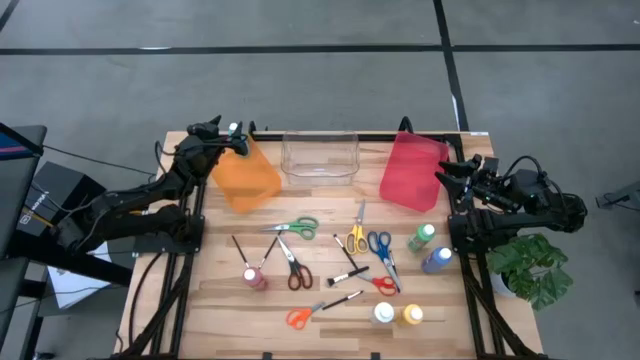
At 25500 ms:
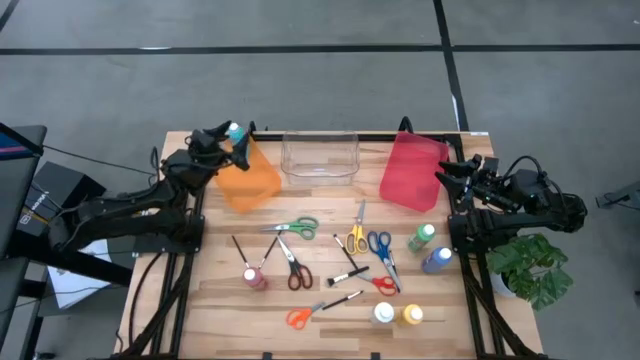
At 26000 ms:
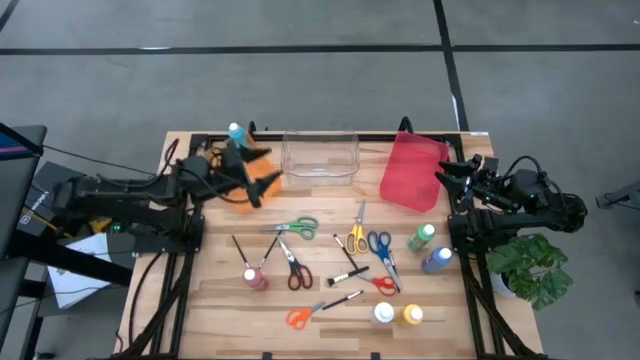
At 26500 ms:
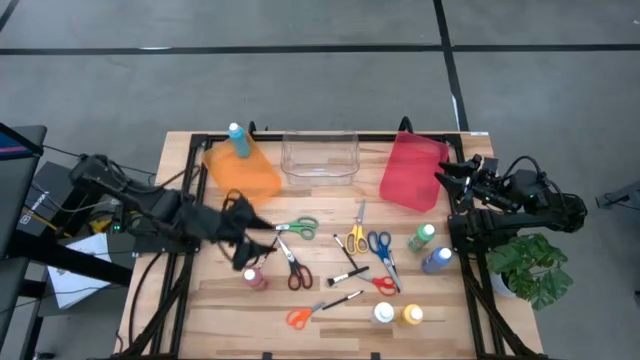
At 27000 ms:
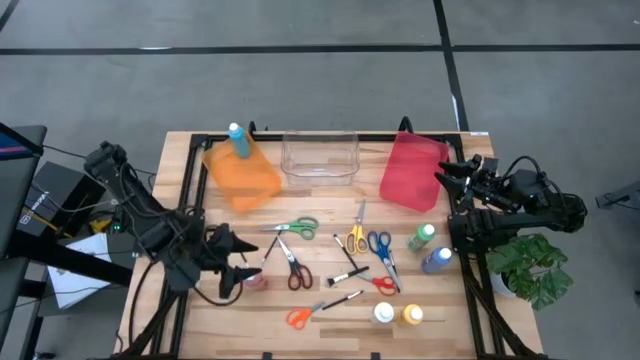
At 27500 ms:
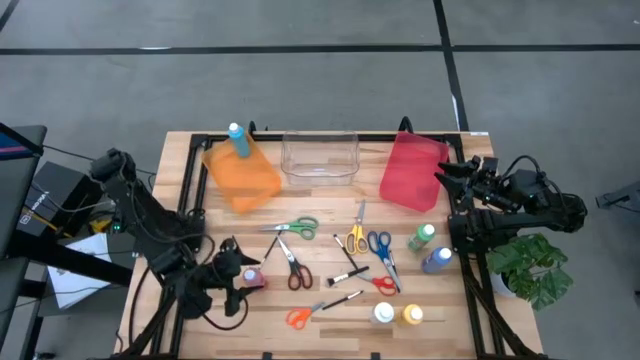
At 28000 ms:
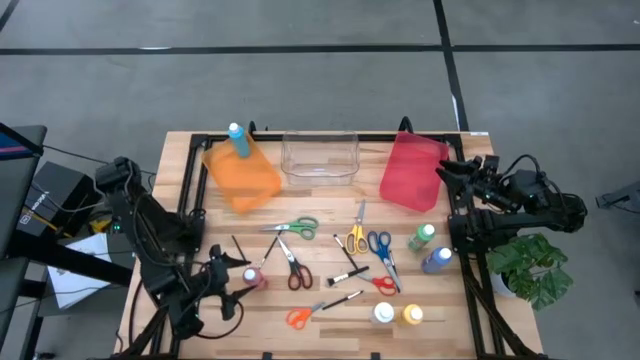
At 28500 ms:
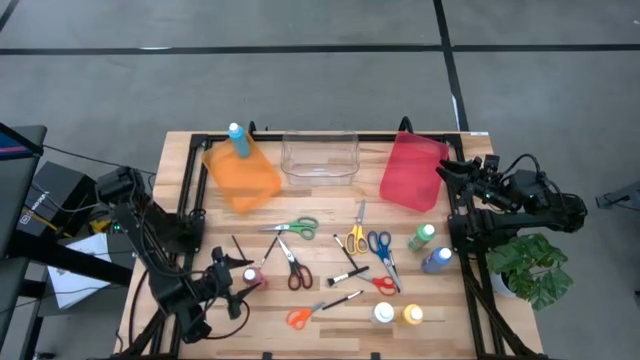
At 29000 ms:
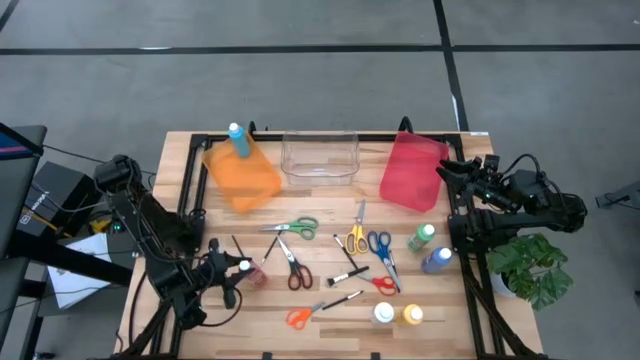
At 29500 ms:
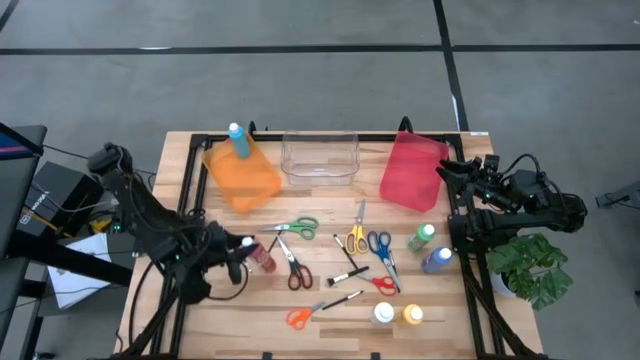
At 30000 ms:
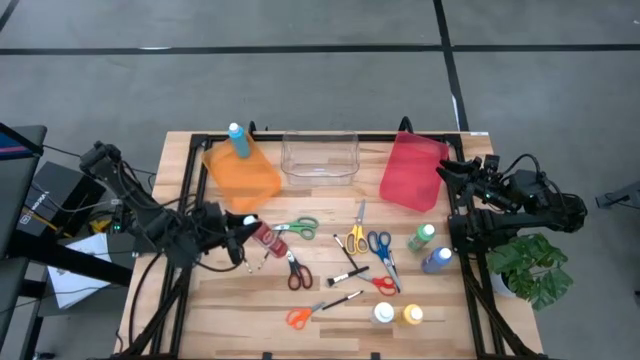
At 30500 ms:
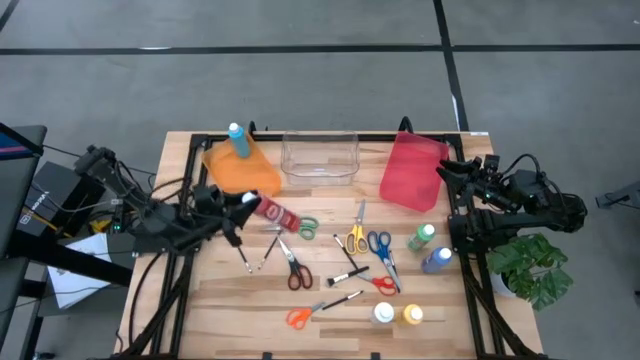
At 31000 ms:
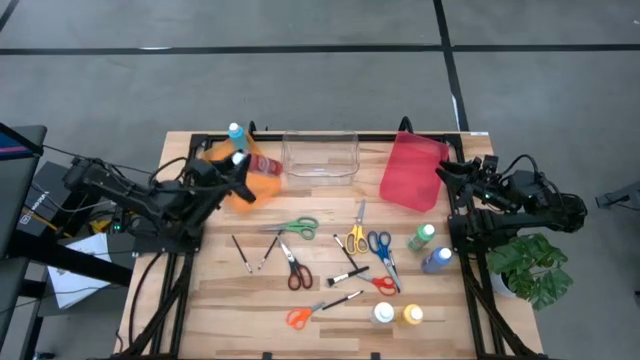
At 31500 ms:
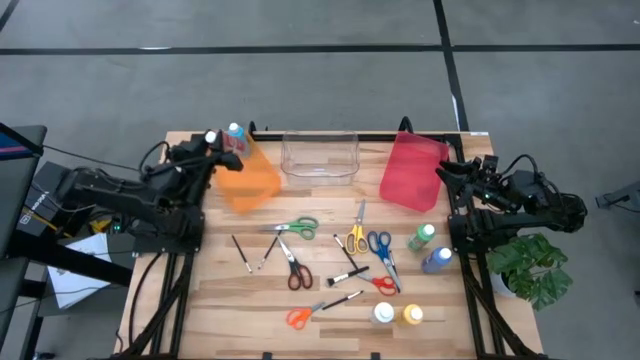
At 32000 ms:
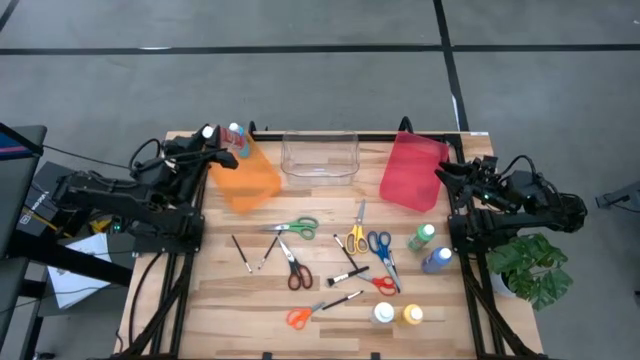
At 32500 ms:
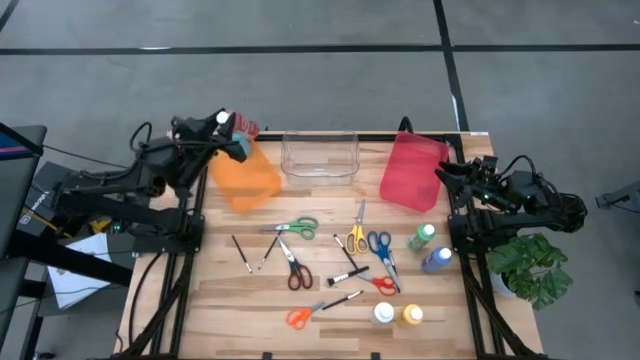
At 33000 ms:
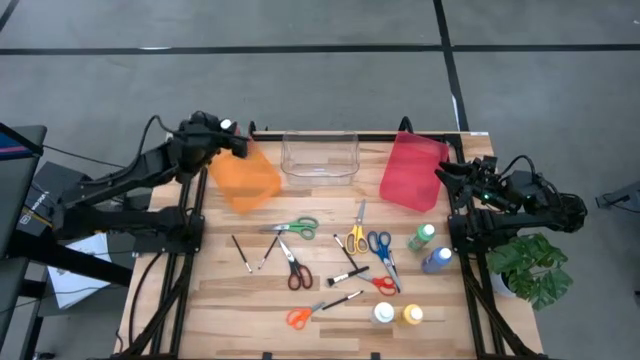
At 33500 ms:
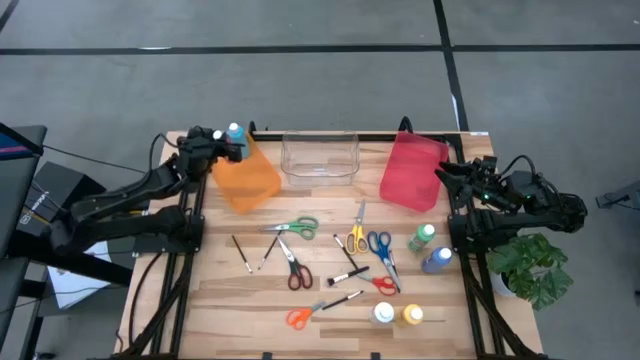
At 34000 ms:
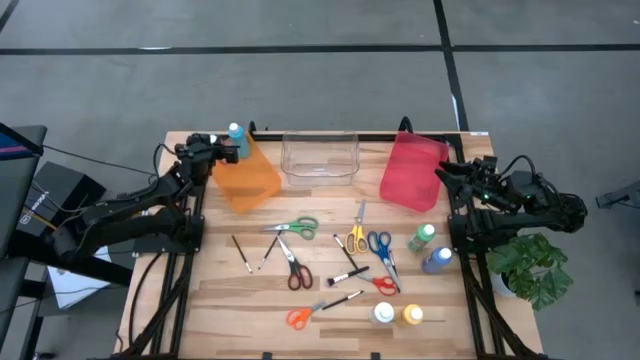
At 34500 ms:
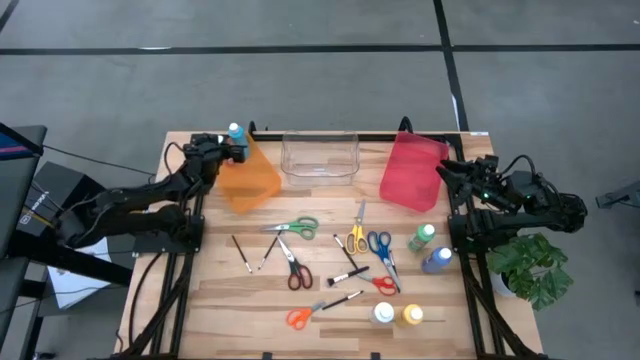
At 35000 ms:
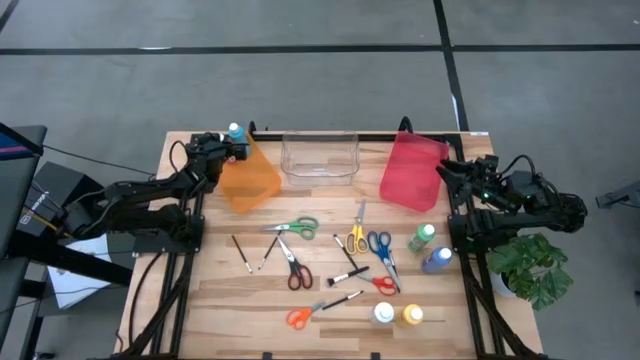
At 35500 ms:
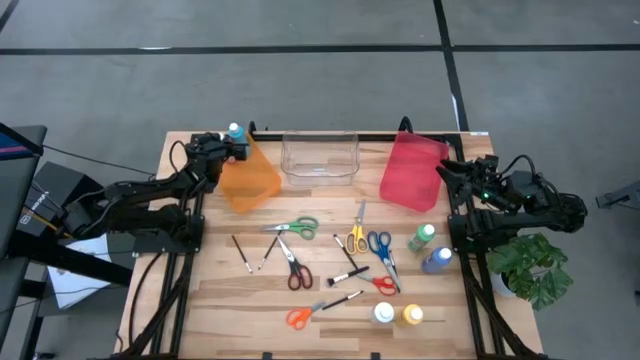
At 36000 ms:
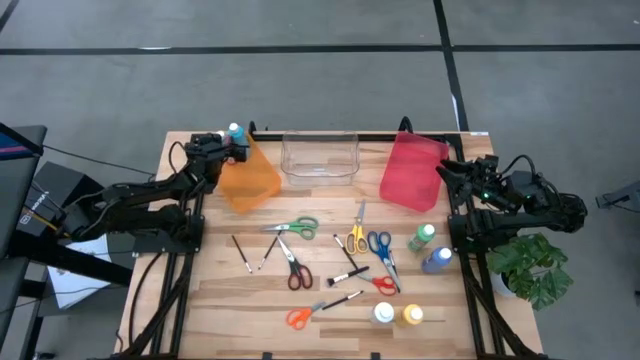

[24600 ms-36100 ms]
Task: Pick & Place Paint Supplies
Put the red paint bottle into the orange bin

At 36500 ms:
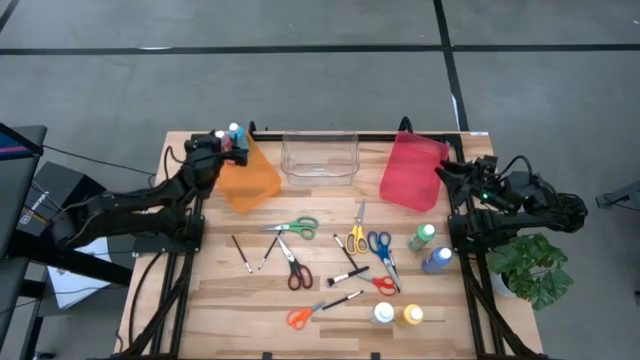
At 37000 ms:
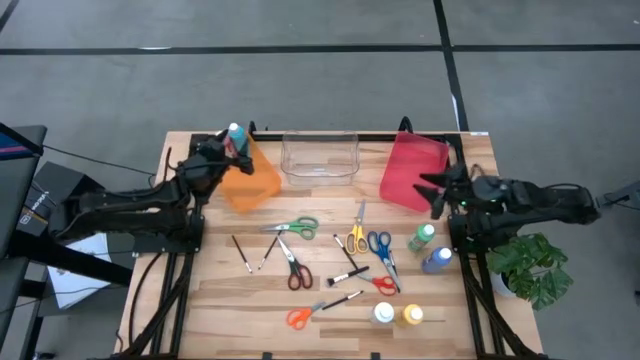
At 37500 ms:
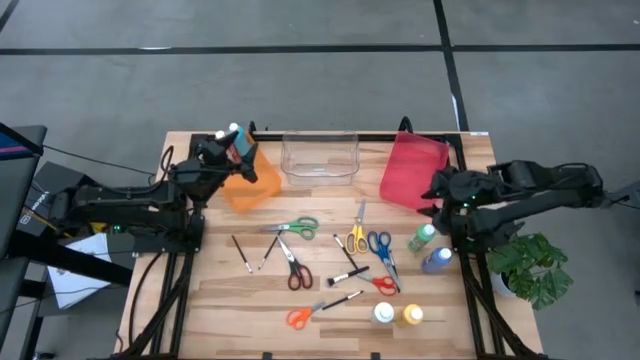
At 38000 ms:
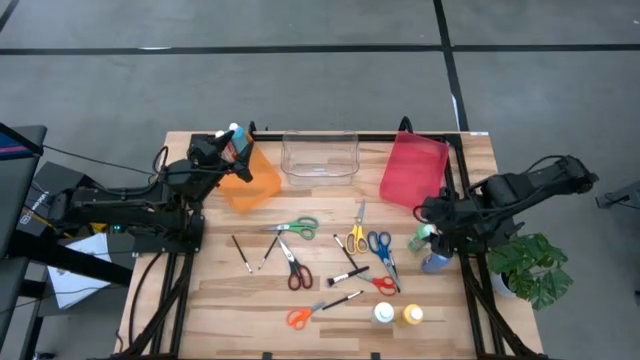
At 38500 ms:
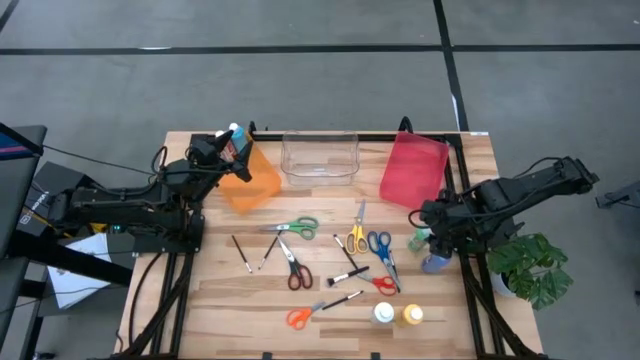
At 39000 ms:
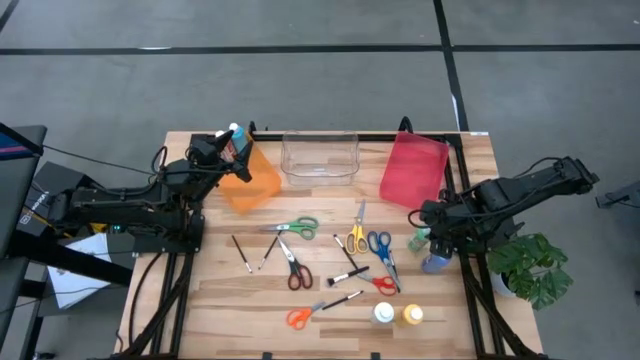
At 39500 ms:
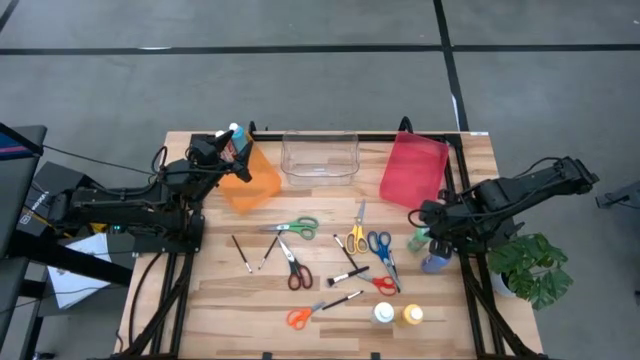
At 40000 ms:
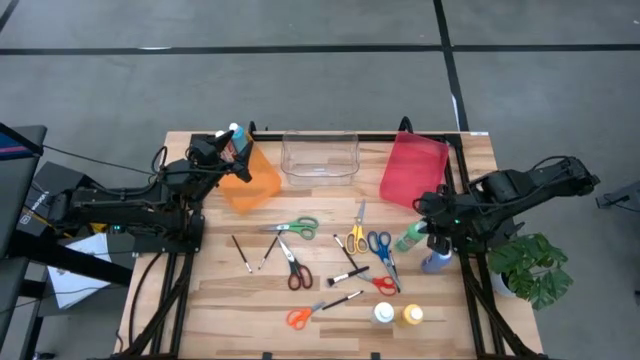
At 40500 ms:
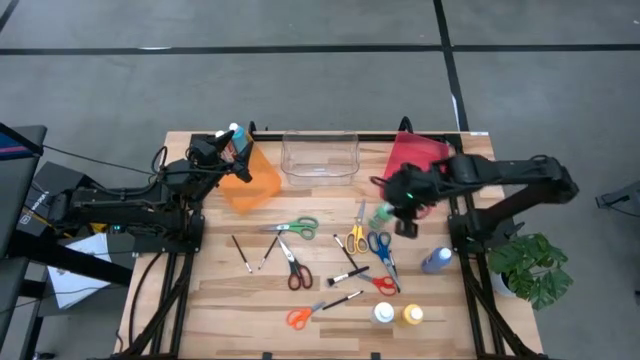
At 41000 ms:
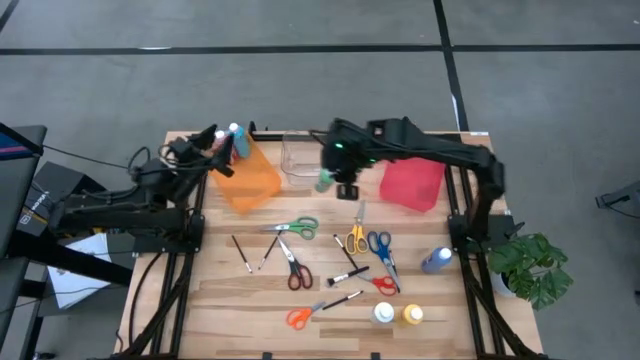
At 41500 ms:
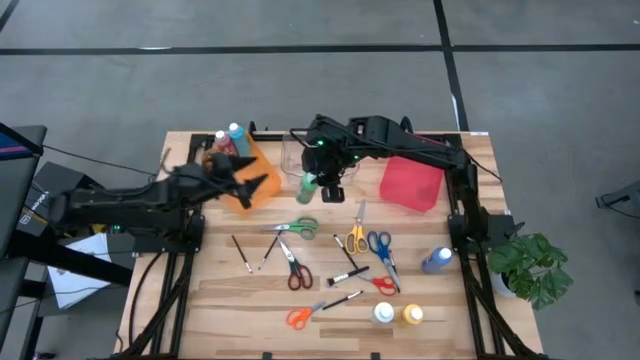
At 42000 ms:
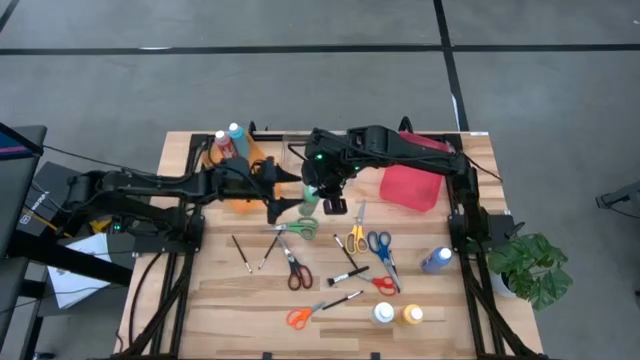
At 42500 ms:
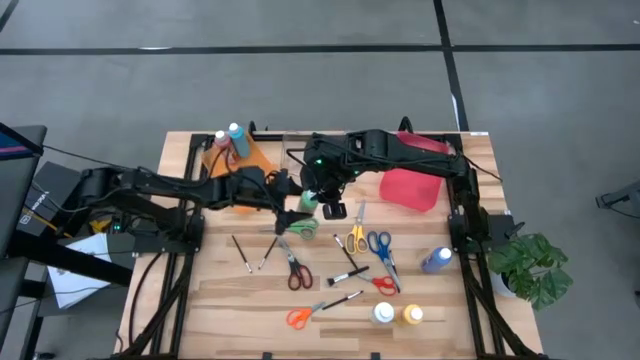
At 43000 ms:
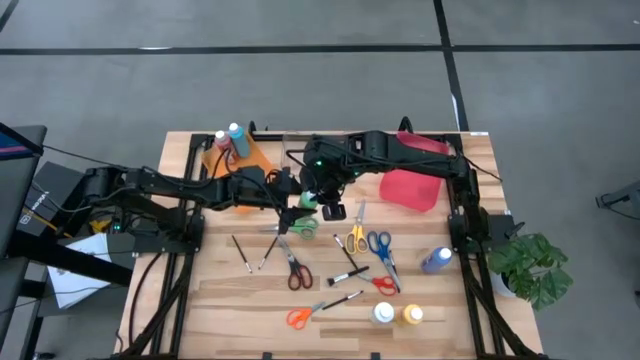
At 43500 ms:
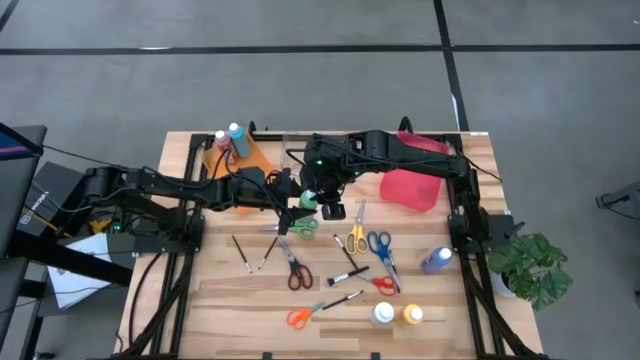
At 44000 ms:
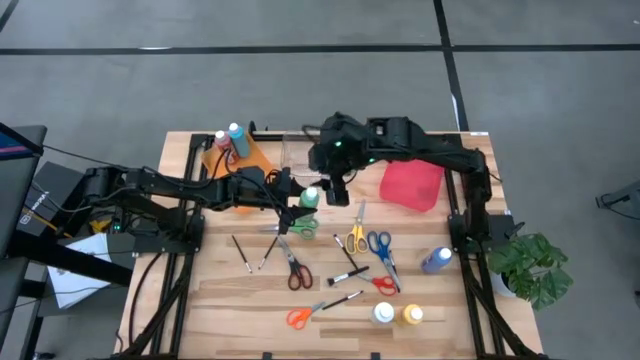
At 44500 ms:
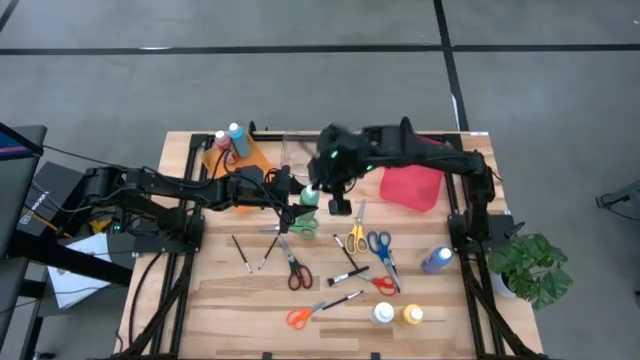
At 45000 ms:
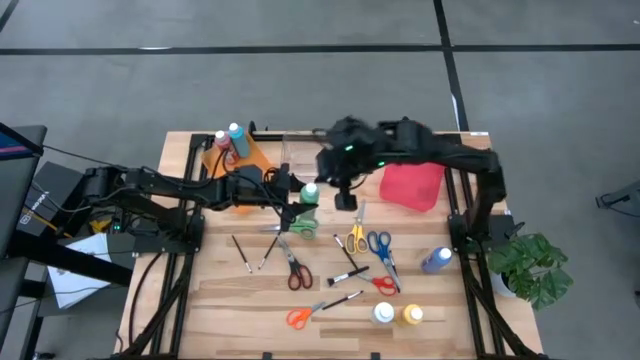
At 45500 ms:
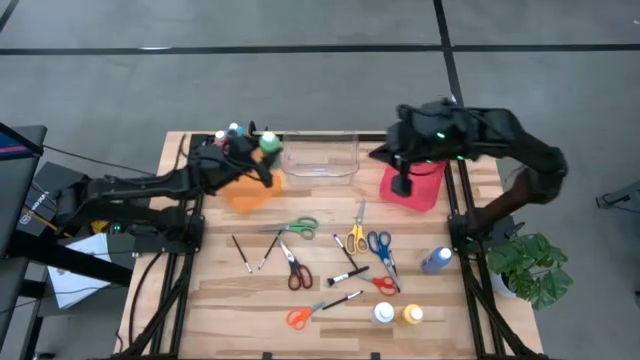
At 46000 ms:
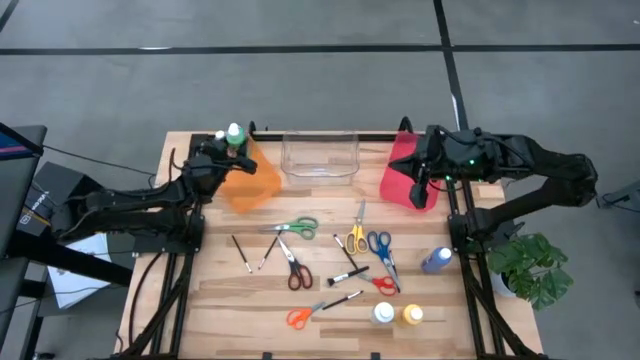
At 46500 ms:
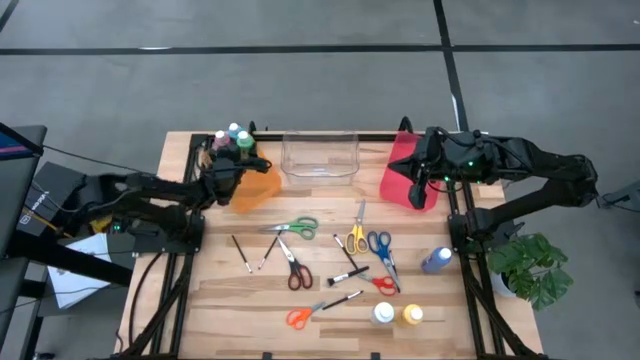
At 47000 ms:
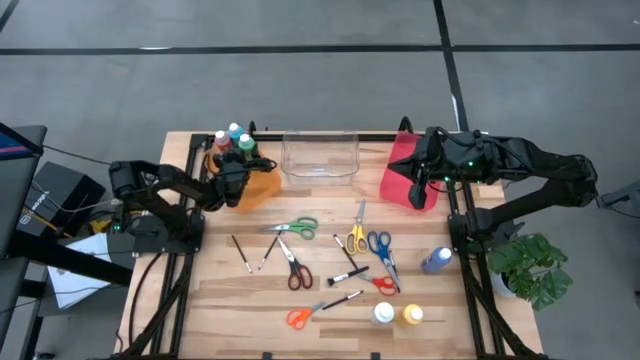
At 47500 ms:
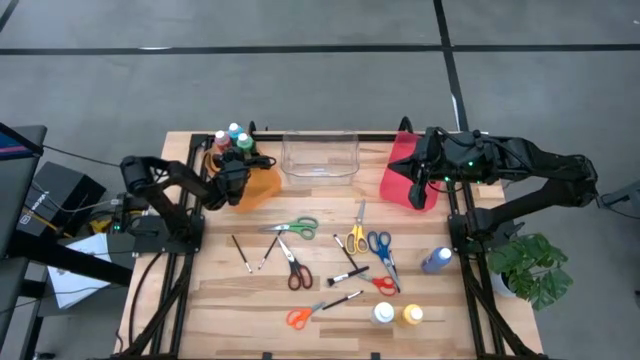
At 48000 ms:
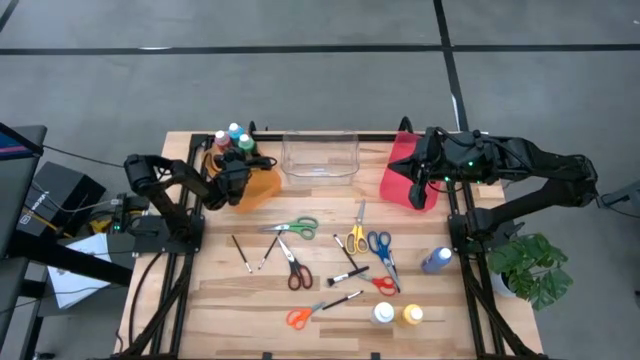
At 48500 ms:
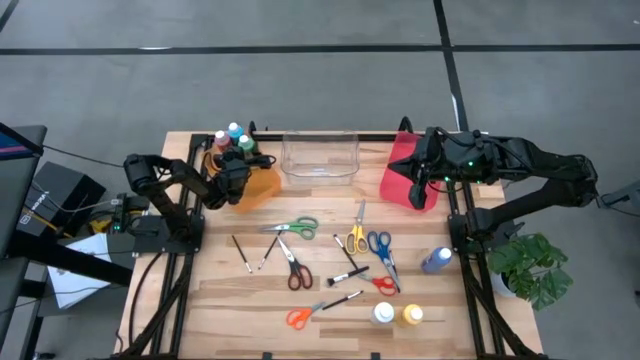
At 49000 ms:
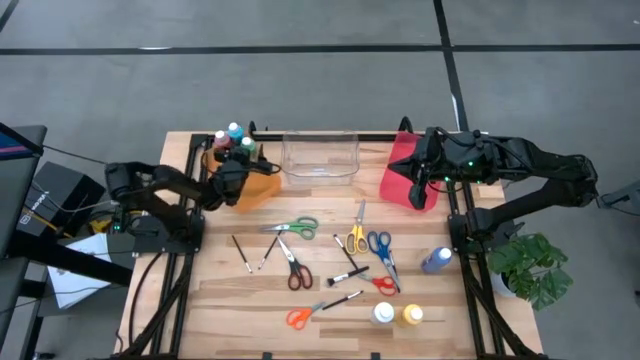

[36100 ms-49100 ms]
Put the green paint bottle into the orange bin
